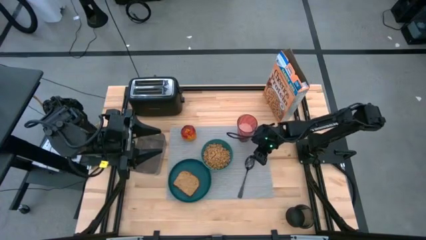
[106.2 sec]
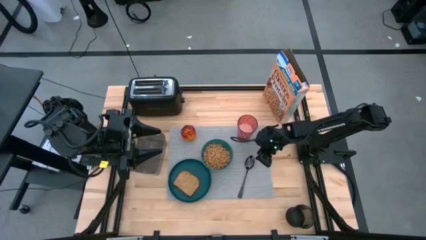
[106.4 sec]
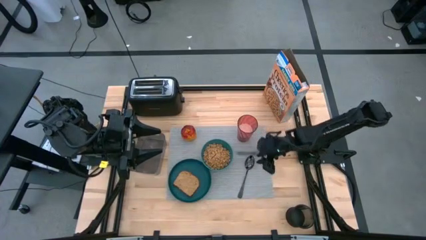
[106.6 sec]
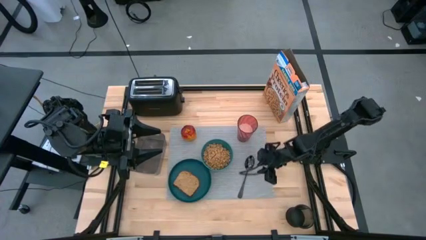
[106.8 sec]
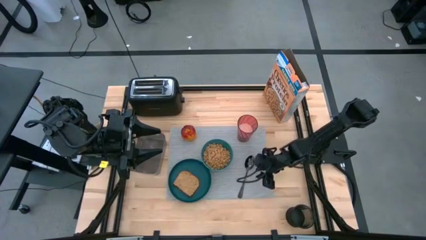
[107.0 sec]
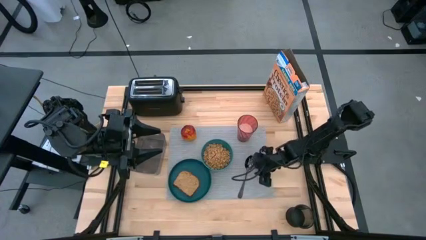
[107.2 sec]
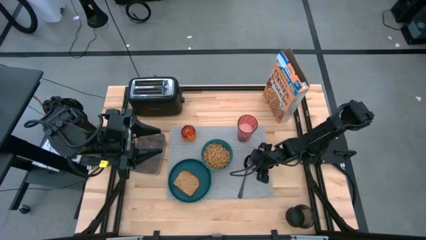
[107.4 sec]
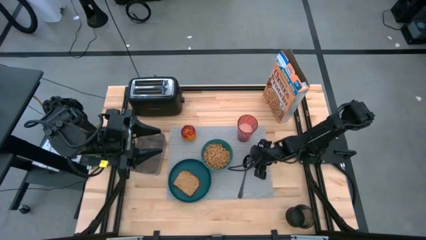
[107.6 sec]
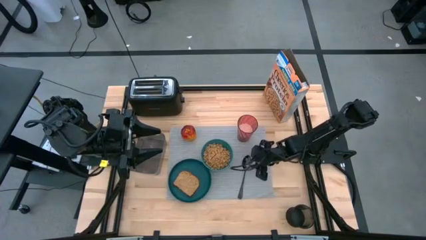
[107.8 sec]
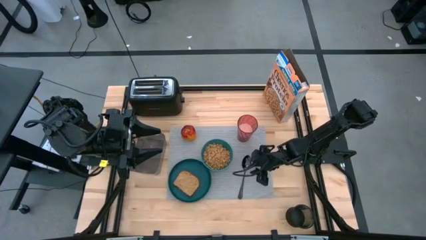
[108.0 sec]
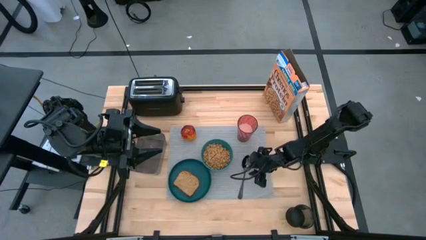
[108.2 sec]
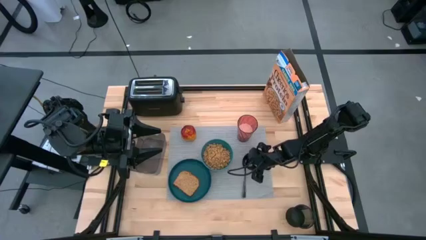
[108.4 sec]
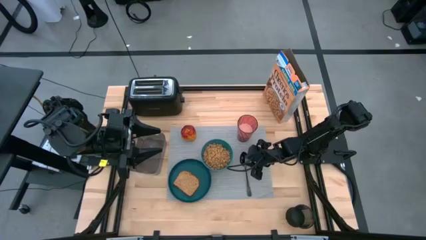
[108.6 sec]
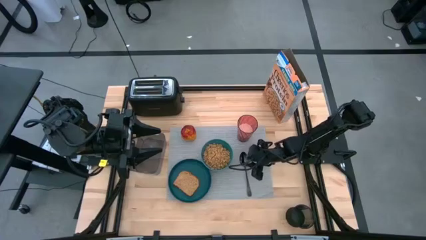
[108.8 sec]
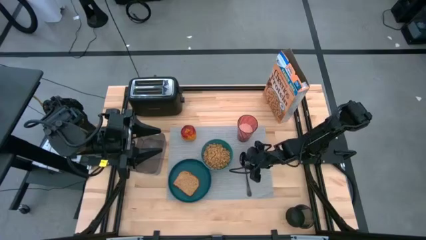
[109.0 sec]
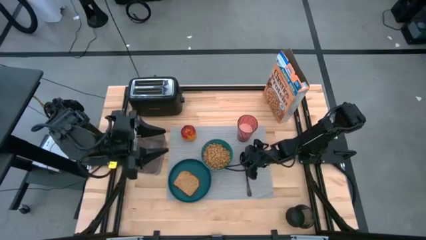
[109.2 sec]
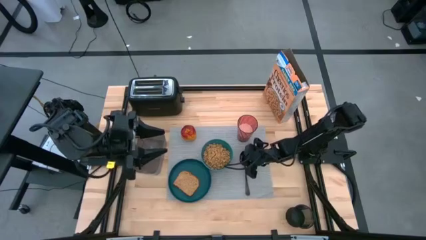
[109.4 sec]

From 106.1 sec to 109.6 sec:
Task: Arrange a breakfast setting
Adjust the black spoon

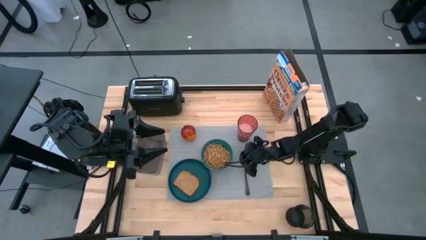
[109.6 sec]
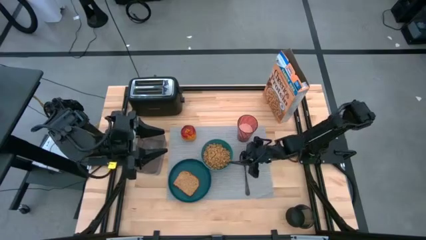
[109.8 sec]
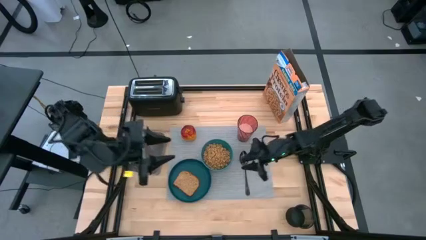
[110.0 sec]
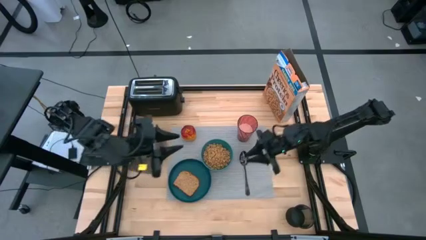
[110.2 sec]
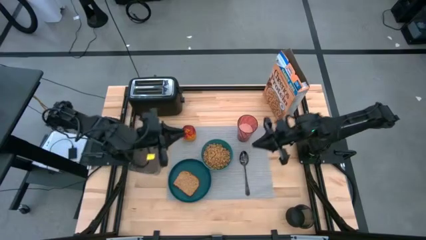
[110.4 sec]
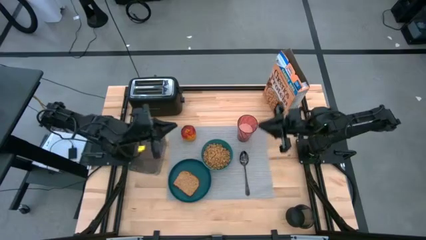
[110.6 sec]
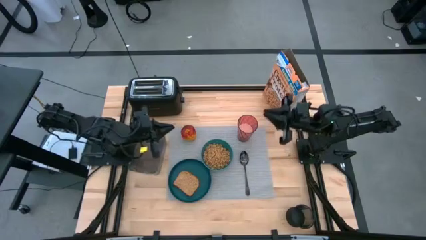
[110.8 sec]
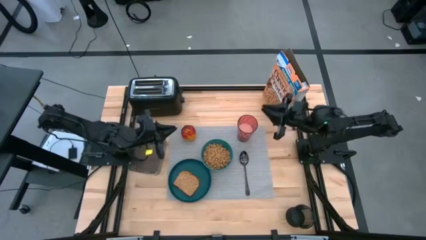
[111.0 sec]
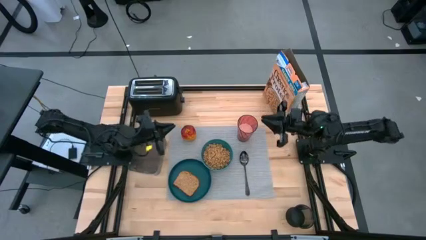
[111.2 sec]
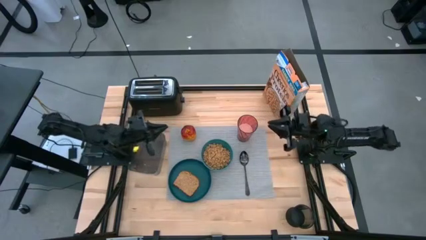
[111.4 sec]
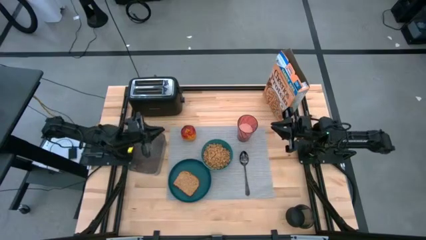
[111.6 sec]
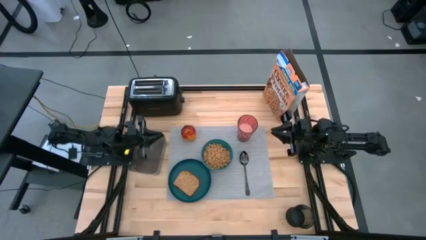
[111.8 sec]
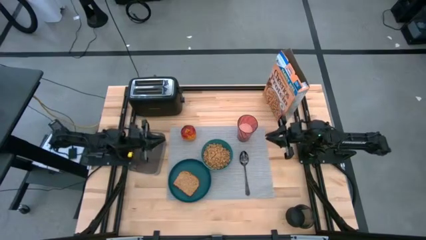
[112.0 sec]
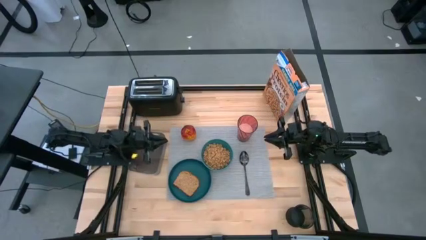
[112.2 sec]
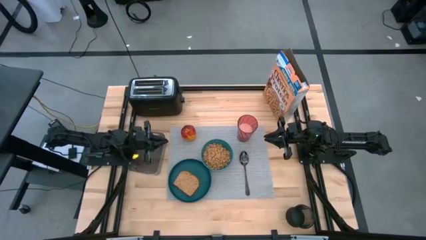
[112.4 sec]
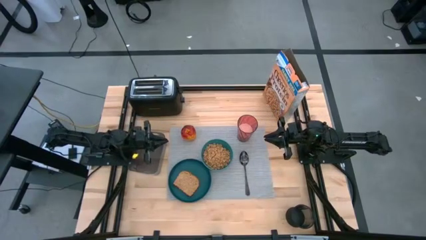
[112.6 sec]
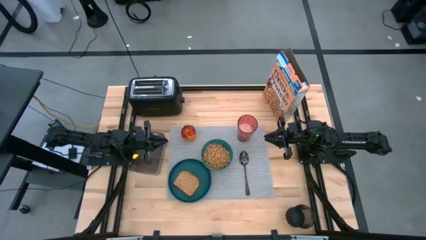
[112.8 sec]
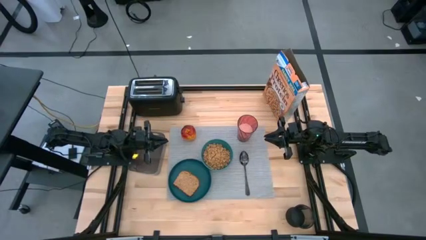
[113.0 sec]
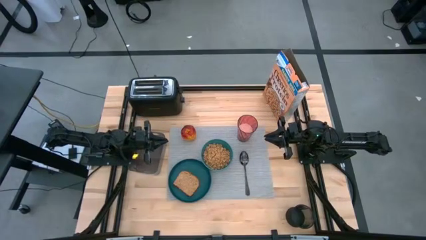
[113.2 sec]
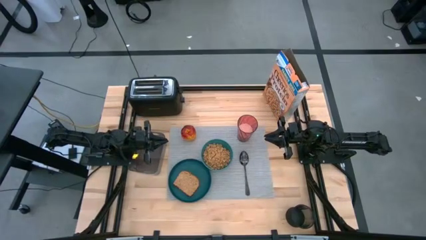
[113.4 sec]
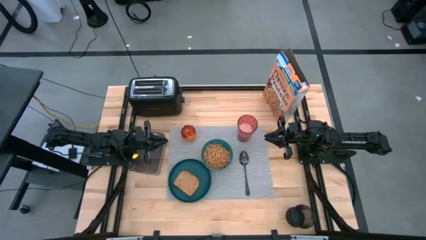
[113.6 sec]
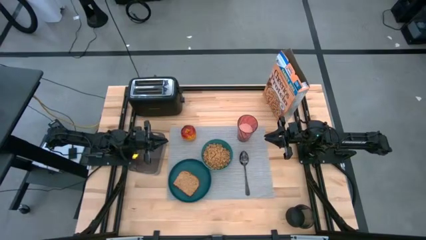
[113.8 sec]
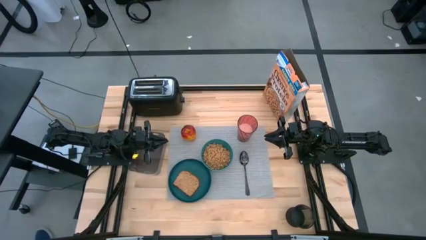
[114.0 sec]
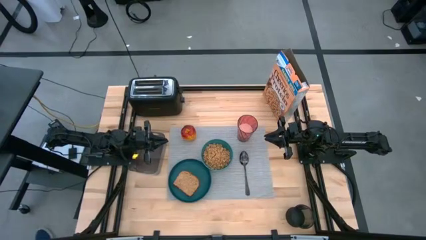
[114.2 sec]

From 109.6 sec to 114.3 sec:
Return to Home Position

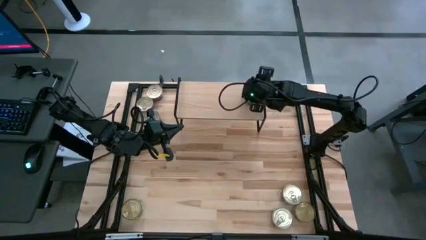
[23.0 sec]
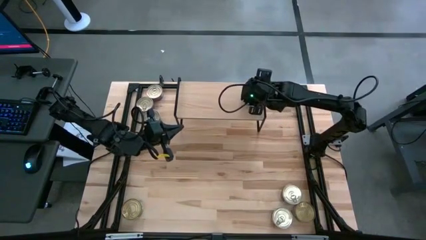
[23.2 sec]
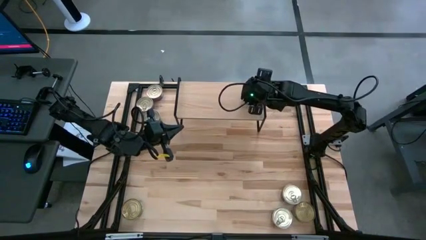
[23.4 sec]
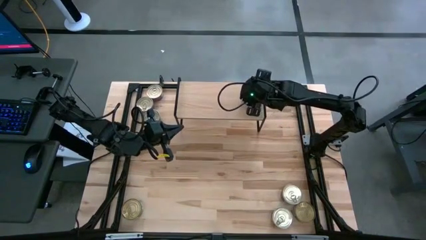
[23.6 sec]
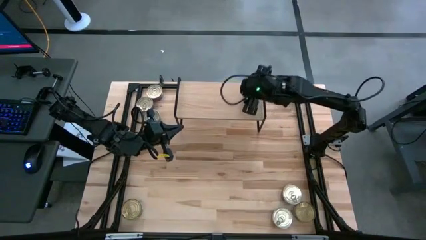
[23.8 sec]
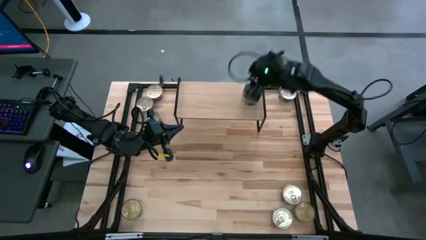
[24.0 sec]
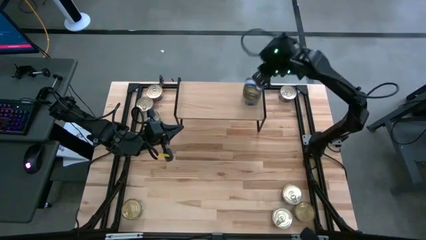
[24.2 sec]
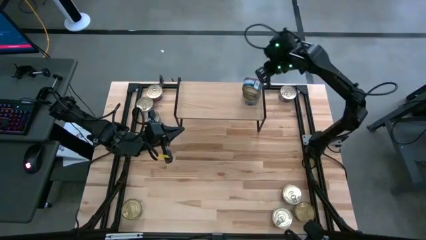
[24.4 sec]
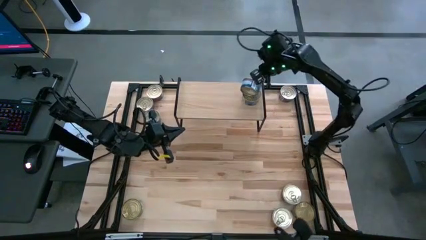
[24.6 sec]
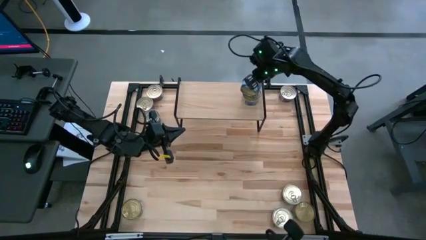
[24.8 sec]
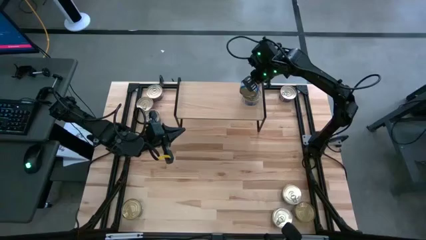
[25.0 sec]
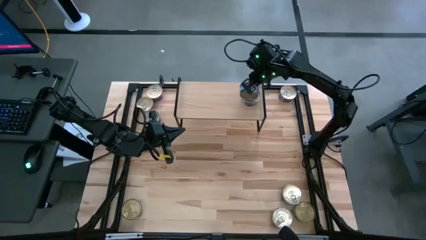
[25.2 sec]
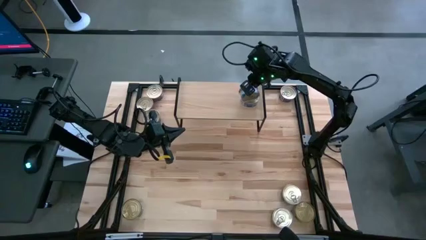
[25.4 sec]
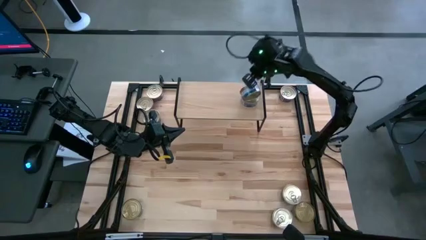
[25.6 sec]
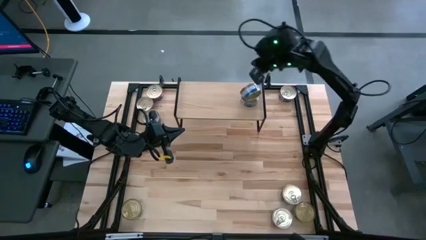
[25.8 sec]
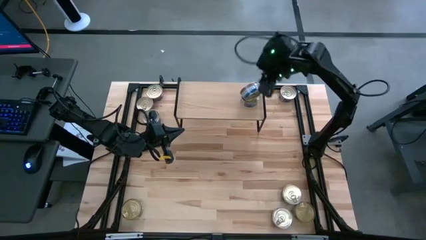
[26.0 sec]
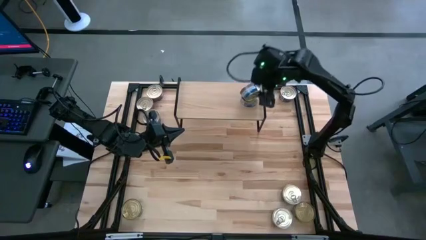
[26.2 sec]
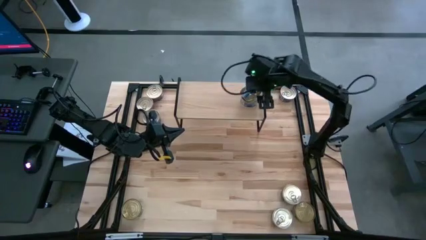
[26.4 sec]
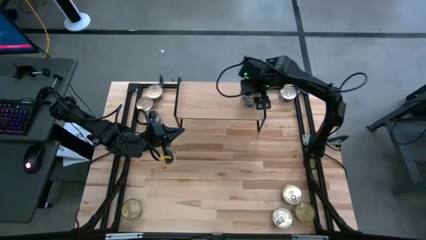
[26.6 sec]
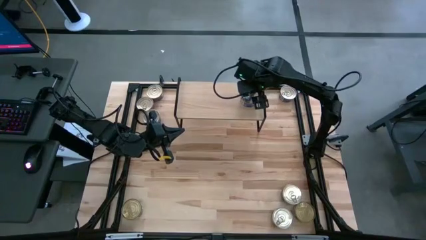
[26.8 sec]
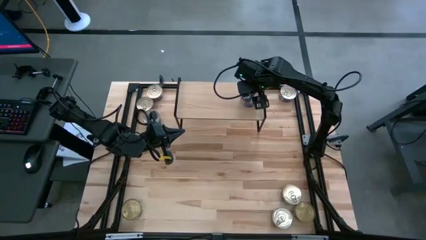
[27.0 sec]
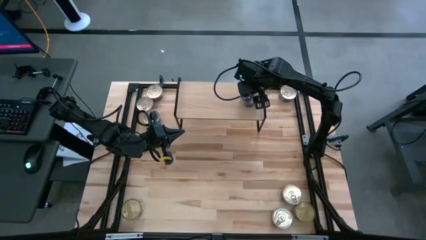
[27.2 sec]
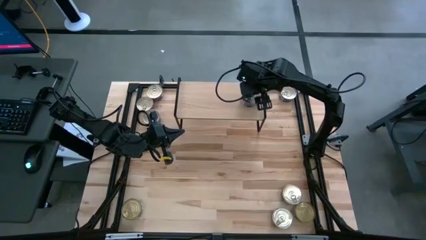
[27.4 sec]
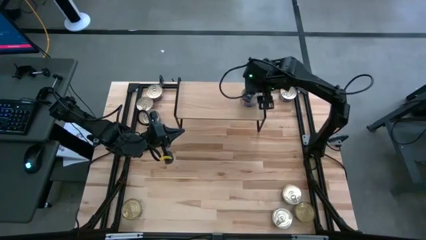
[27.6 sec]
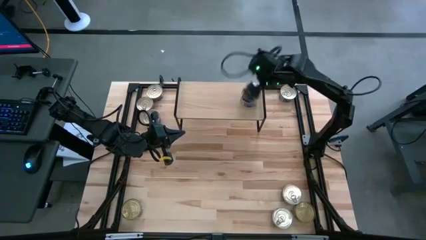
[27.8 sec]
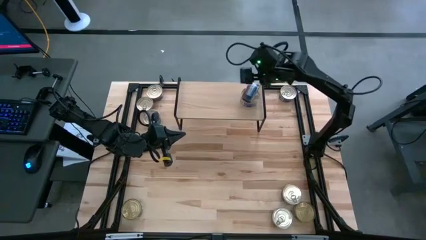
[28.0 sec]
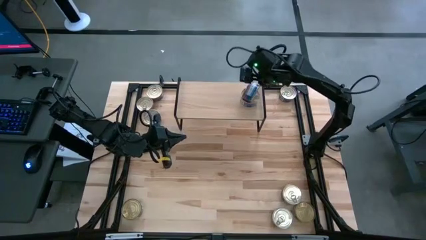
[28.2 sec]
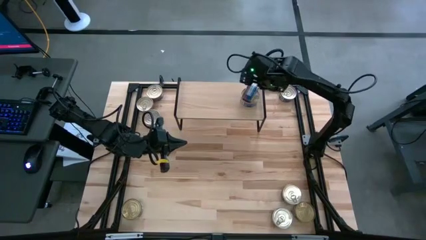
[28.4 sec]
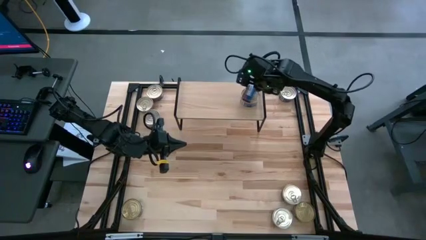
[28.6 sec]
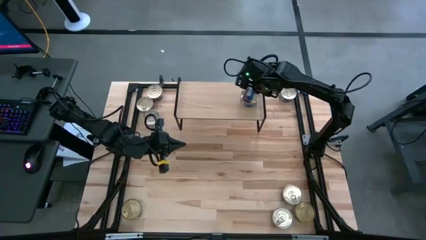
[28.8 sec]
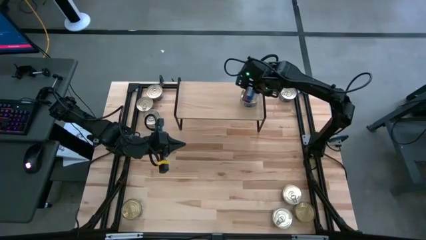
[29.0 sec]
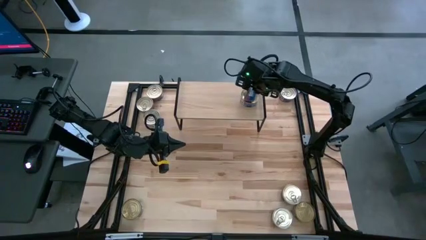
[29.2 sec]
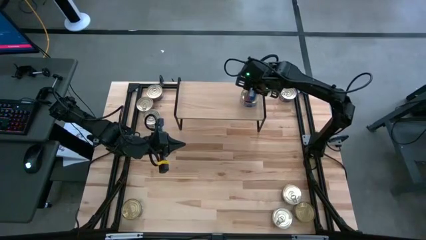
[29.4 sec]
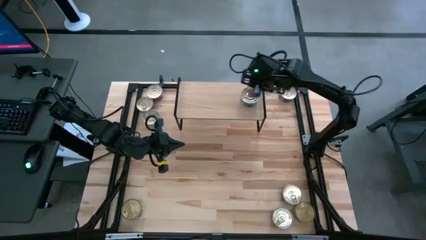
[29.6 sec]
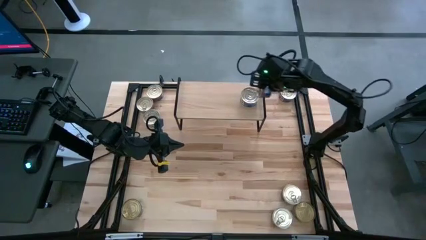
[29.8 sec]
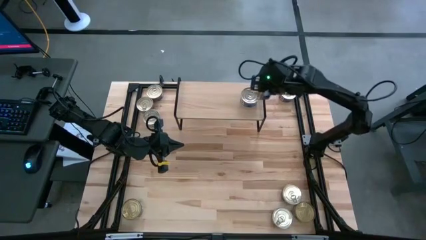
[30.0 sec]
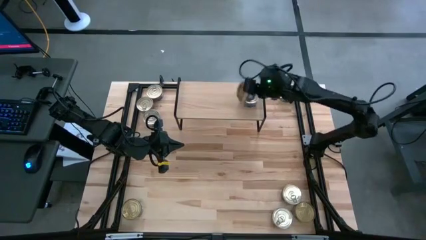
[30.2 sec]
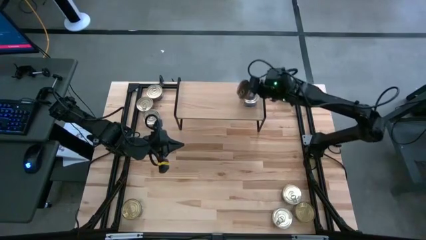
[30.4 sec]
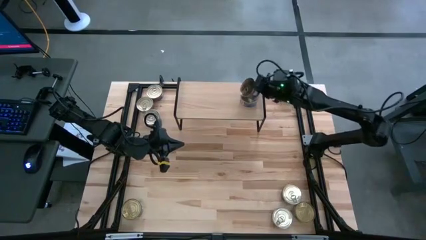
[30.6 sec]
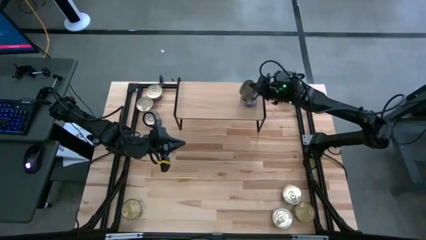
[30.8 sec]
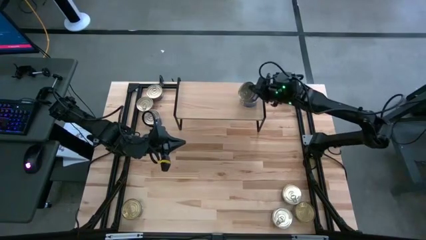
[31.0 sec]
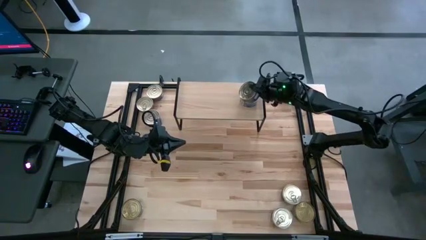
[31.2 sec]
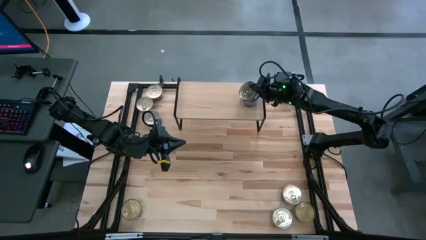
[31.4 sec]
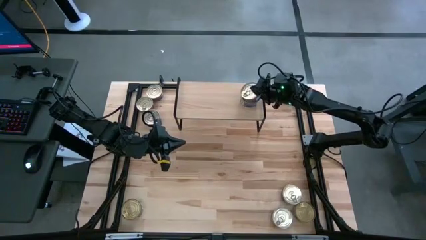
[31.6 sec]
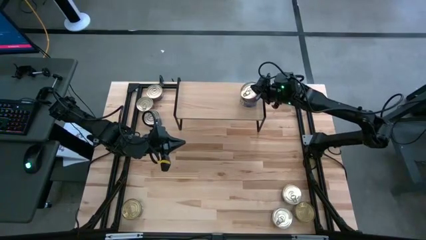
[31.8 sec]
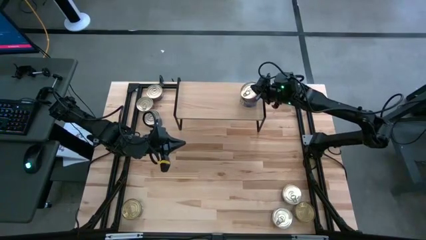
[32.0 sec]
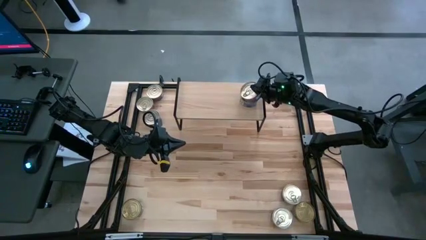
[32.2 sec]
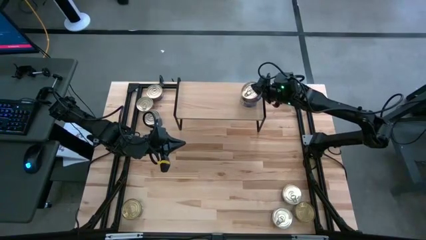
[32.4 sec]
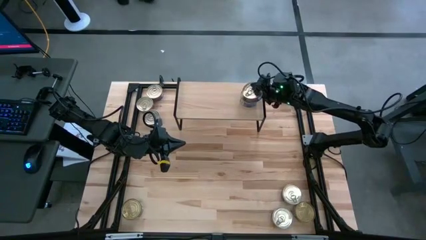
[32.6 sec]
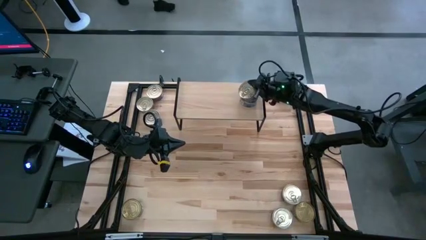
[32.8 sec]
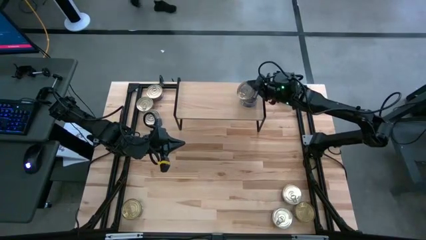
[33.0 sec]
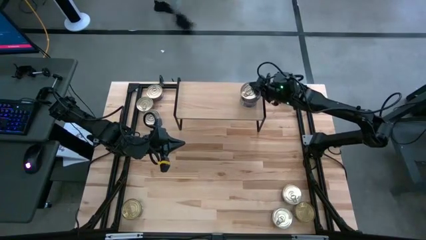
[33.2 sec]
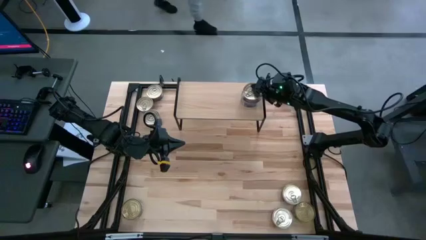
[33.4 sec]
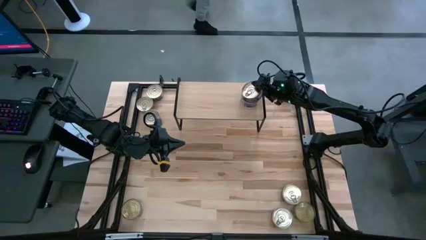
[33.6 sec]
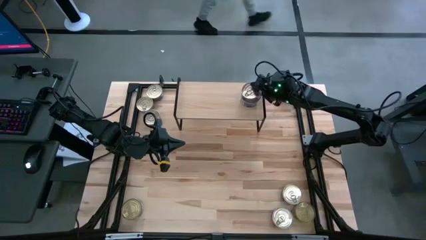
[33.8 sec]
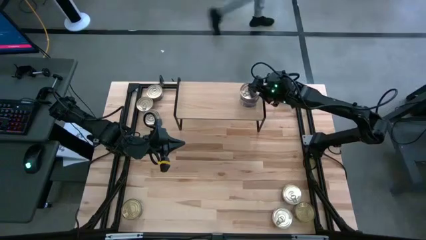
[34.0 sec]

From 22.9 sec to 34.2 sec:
Task: Stack canned seafood by type on shelf
Stack the blue tuna can on top of the blue tuna can on the shelf
